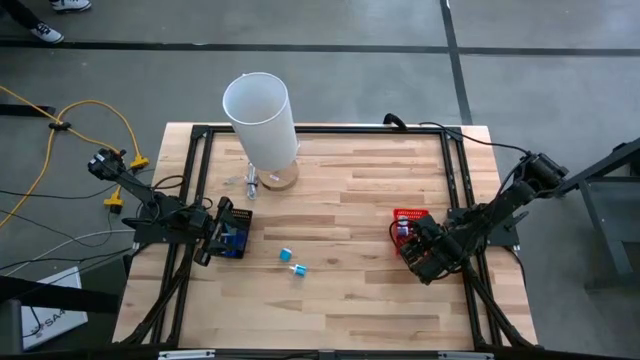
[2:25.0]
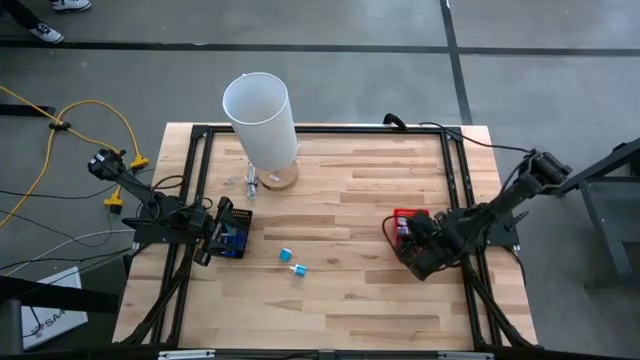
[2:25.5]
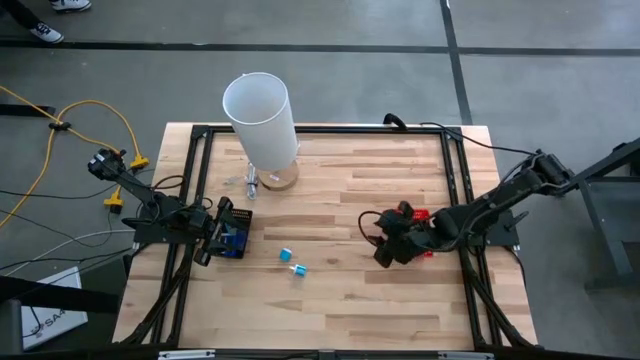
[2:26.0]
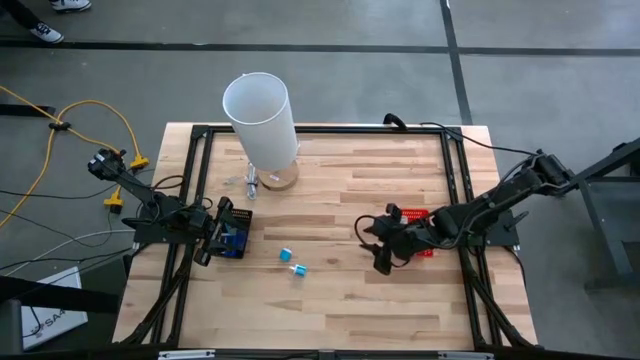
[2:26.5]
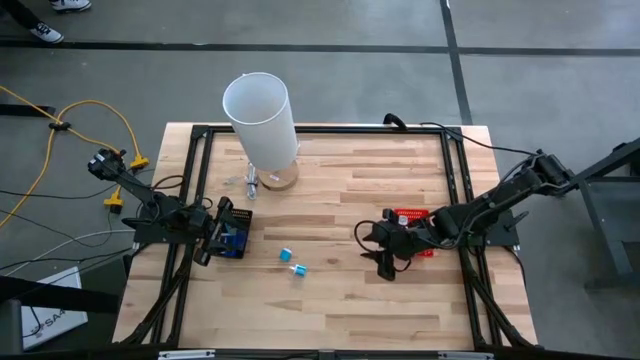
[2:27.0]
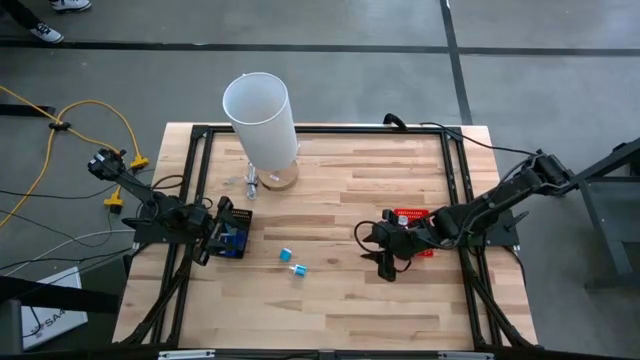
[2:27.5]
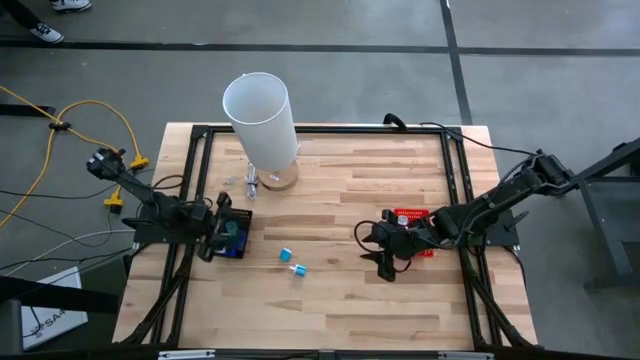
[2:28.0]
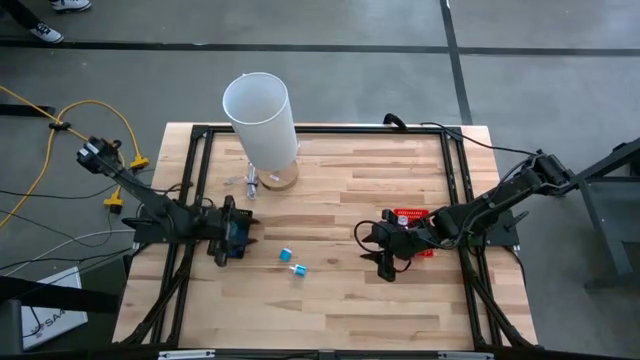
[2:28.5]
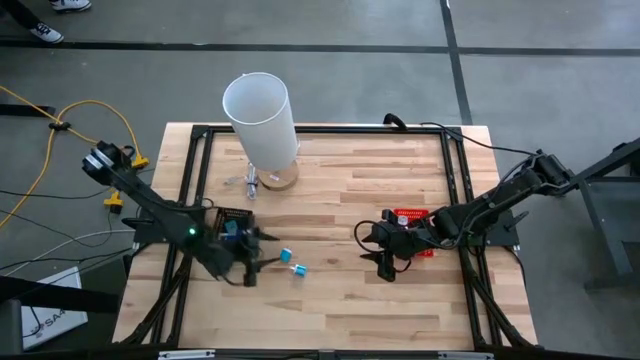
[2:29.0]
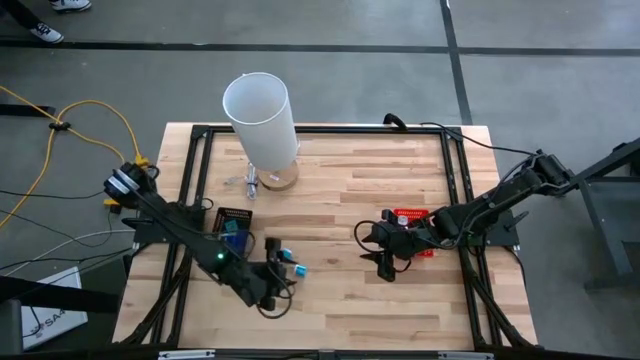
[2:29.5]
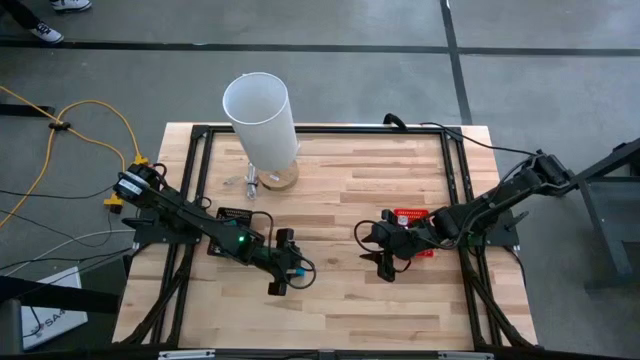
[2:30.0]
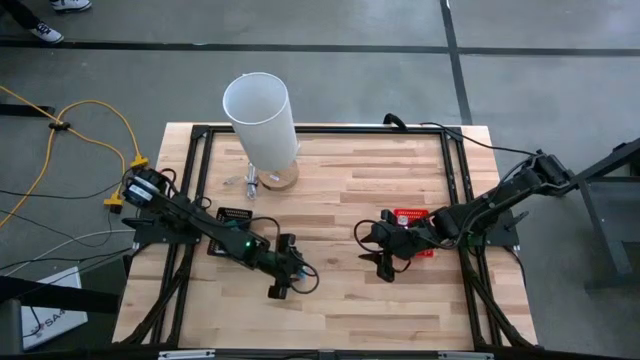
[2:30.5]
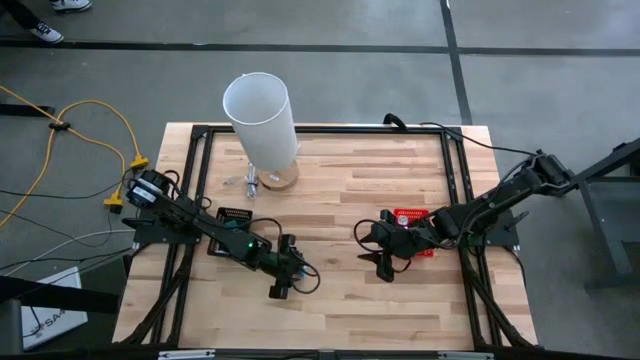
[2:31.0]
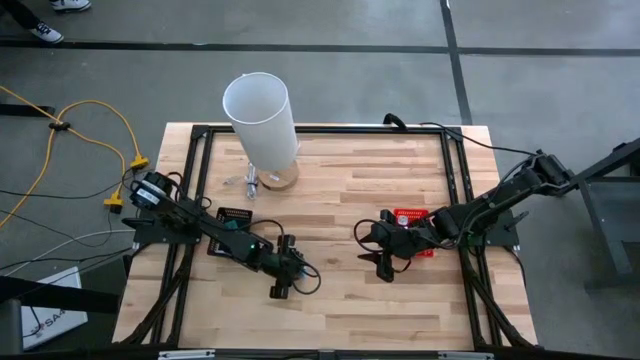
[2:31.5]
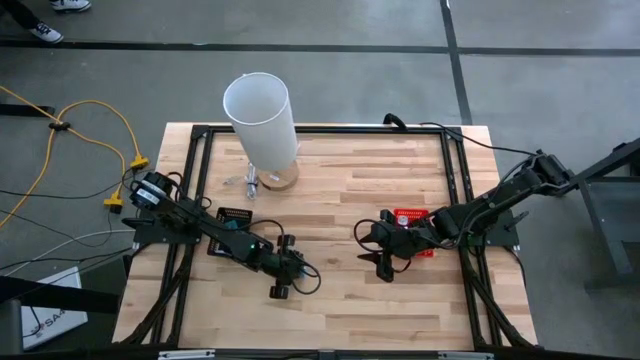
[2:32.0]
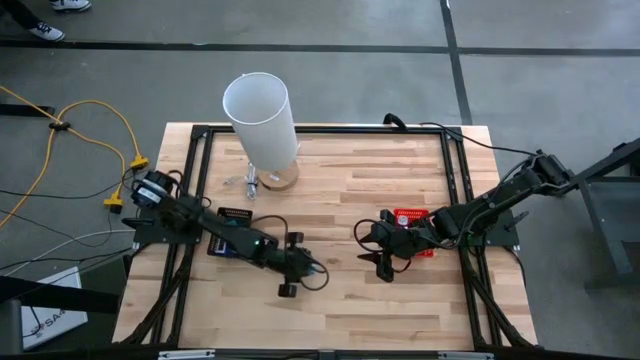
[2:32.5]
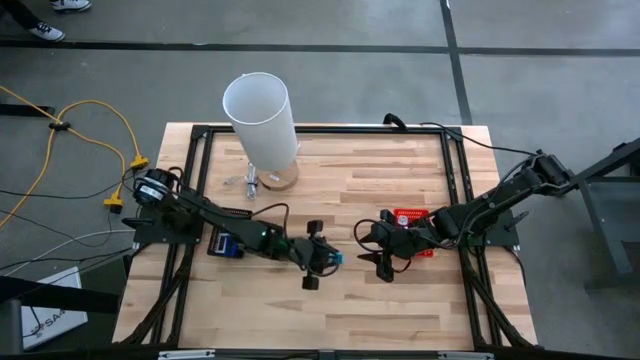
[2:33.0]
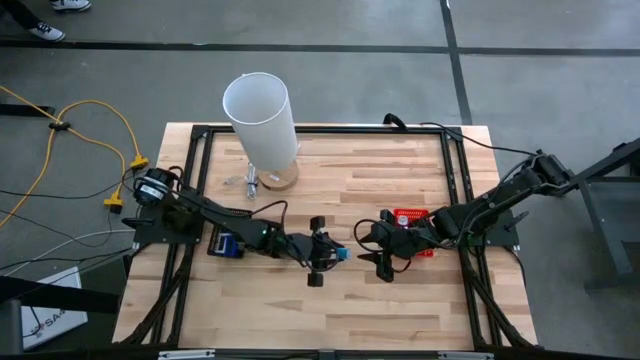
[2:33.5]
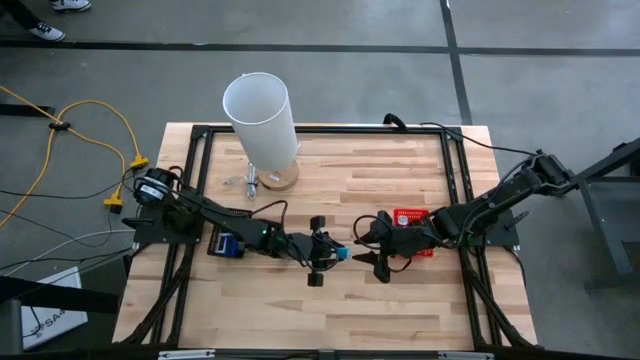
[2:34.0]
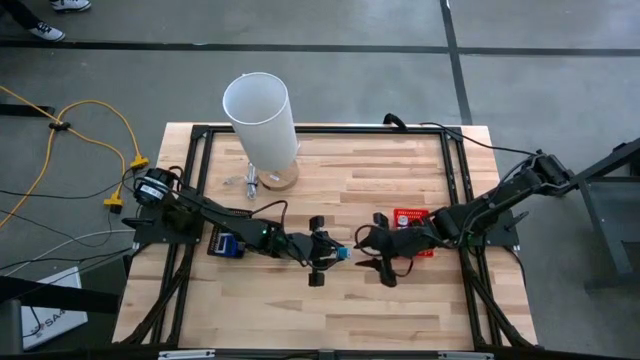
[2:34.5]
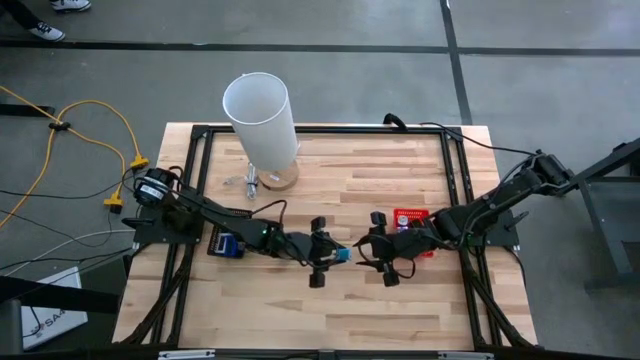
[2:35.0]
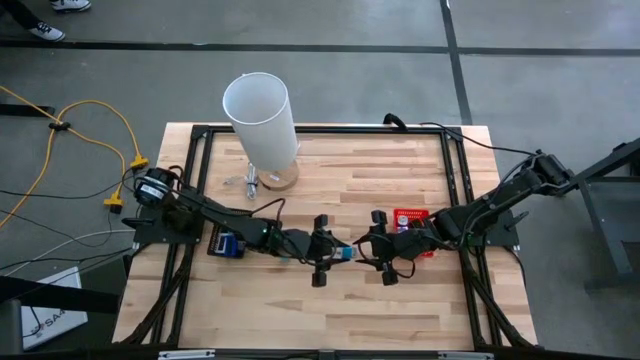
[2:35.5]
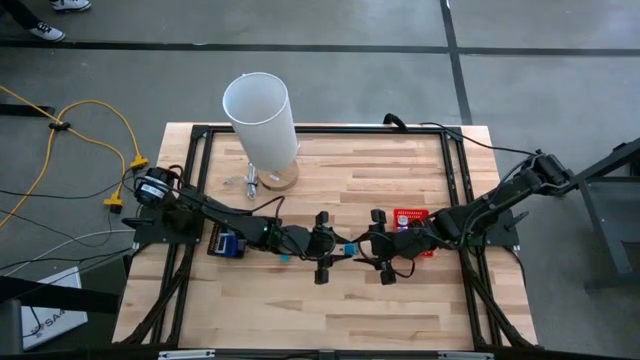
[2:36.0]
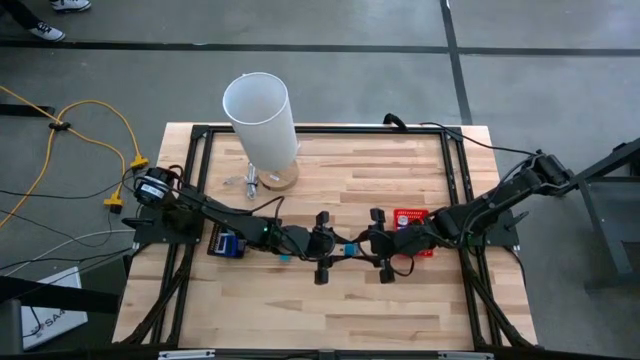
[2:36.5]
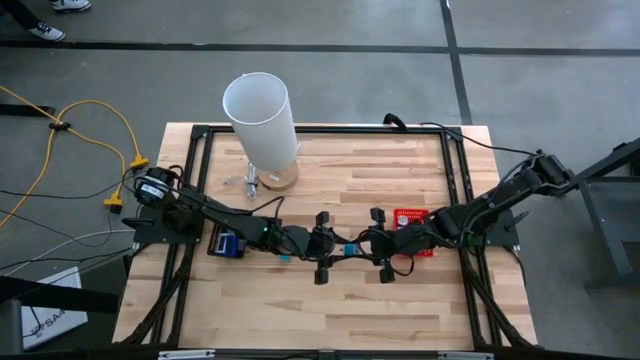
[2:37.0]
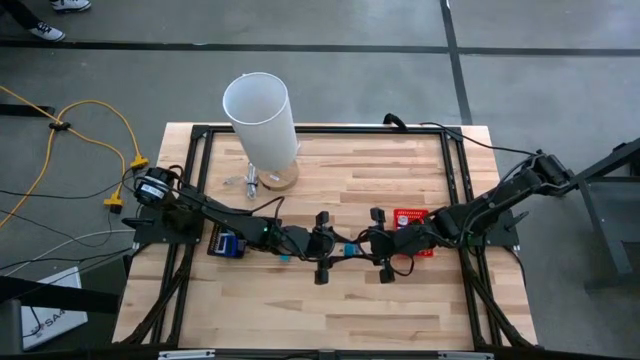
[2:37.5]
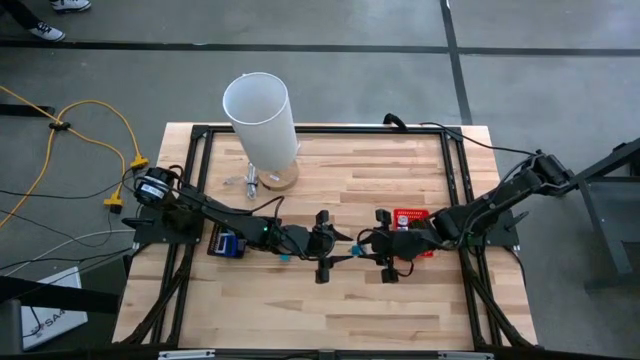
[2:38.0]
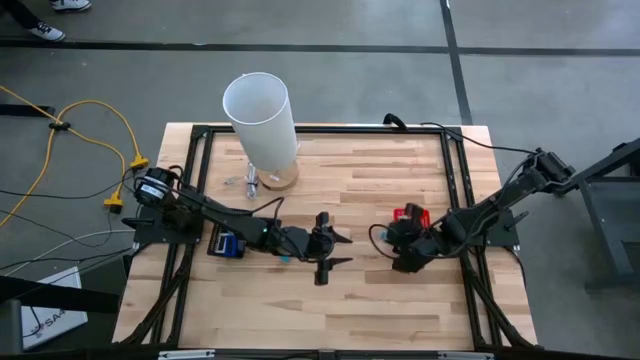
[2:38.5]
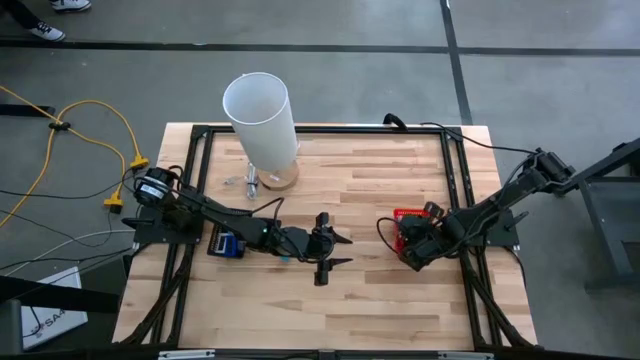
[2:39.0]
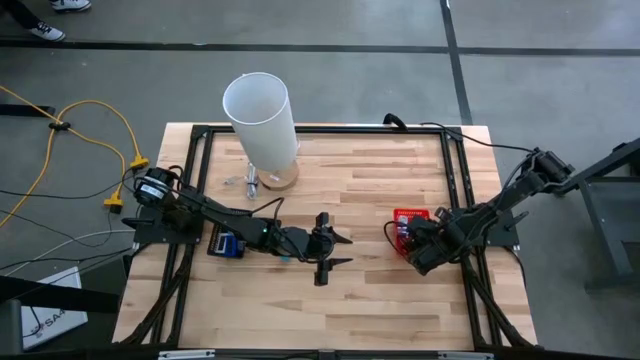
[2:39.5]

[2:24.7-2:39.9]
Task: Pick & Place Office items
Put the right blue charger adapter into the red bin

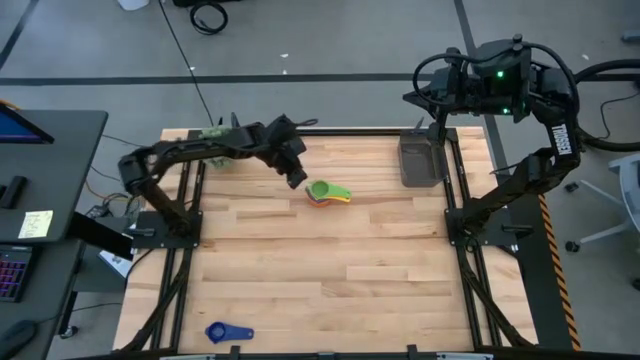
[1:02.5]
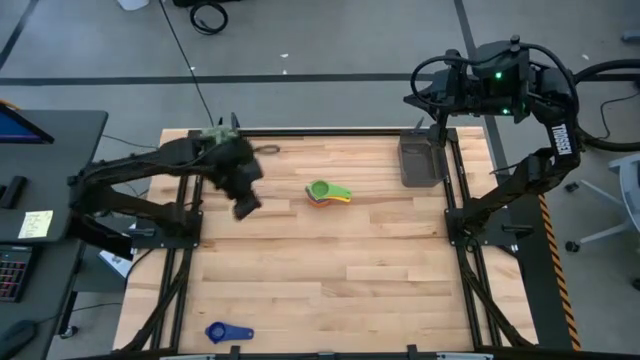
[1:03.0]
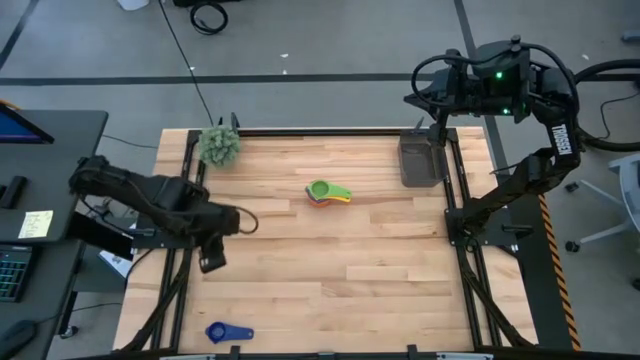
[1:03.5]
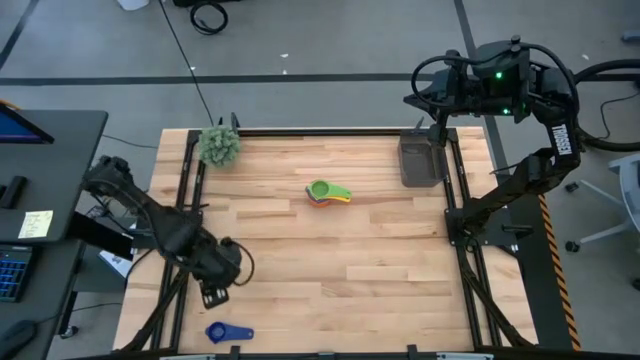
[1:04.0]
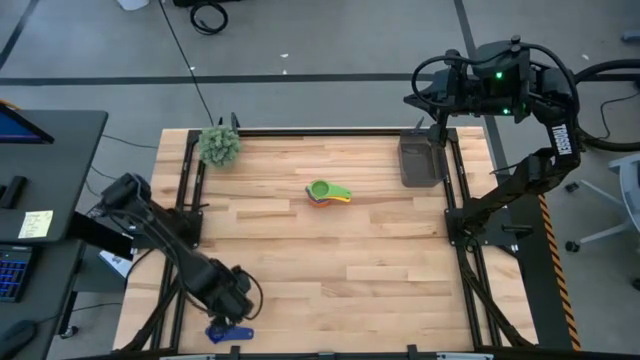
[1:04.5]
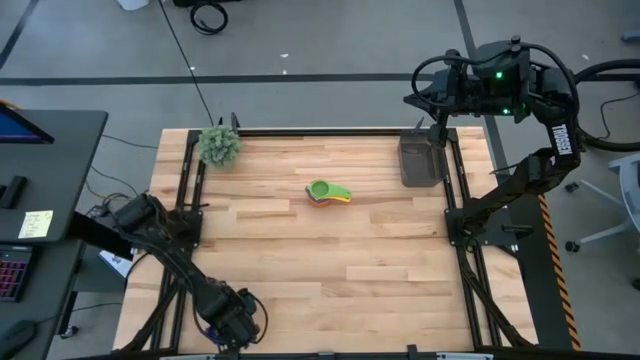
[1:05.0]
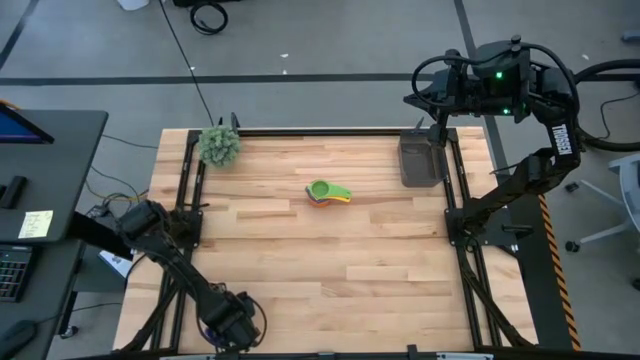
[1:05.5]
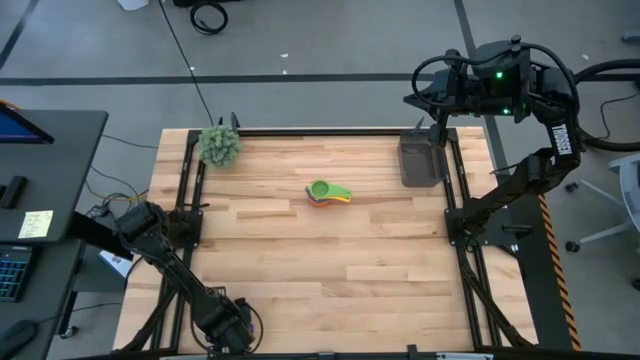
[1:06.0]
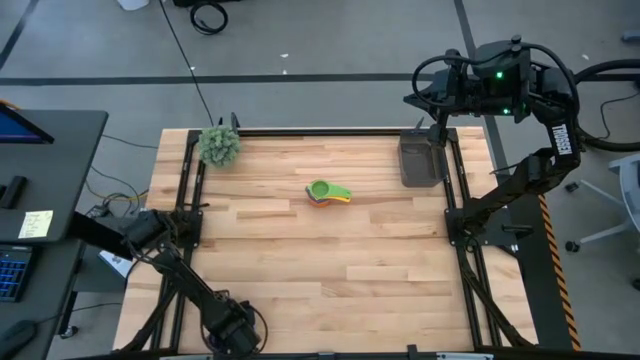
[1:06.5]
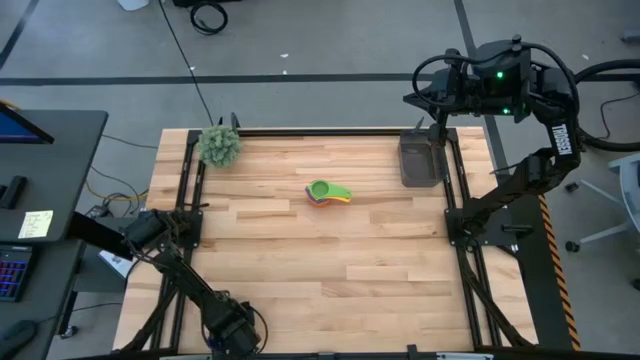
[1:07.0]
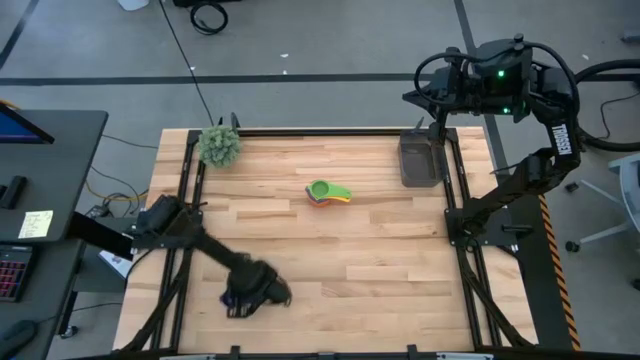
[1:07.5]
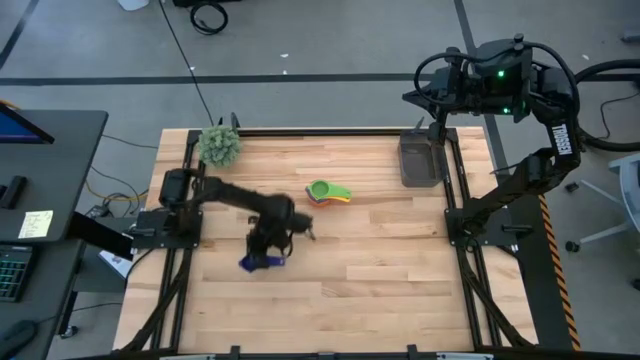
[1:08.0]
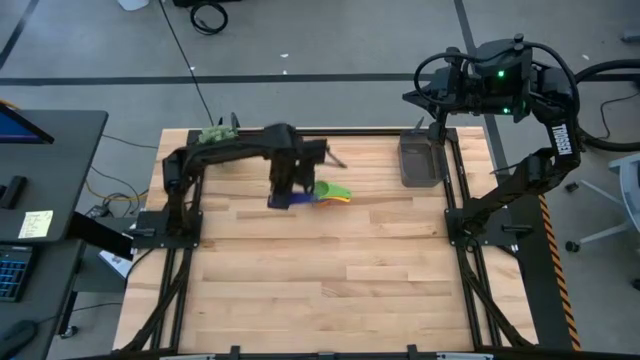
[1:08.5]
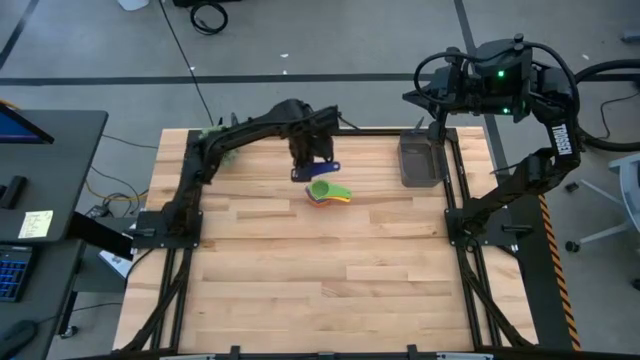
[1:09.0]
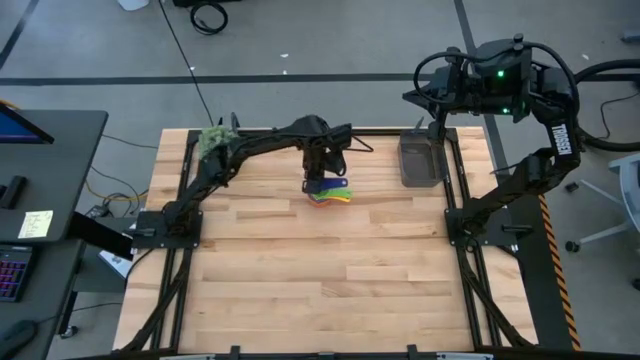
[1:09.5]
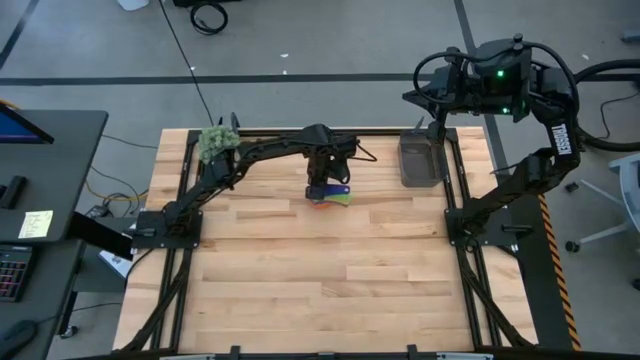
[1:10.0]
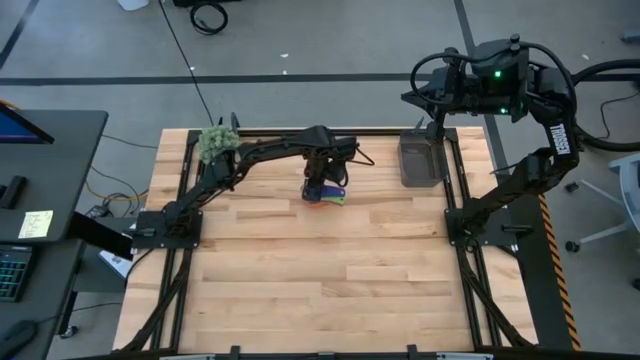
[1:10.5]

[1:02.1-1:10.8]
Task: Nest measuring cups in basket
Stack the purple measuring cup on top of the green measuring cup
